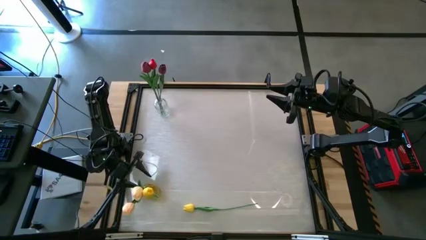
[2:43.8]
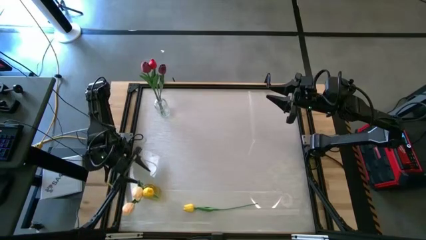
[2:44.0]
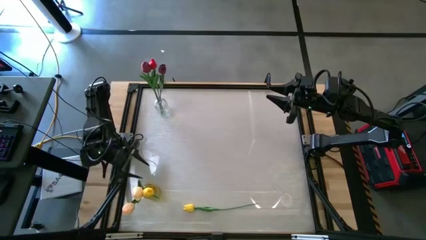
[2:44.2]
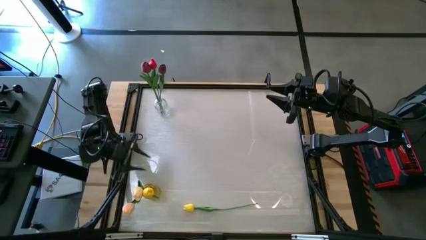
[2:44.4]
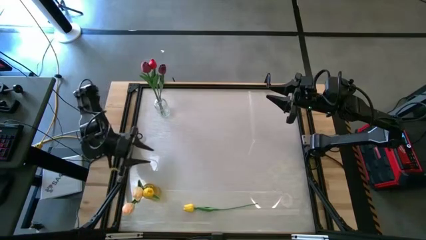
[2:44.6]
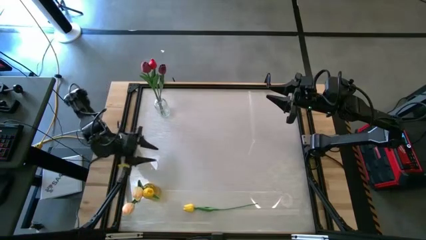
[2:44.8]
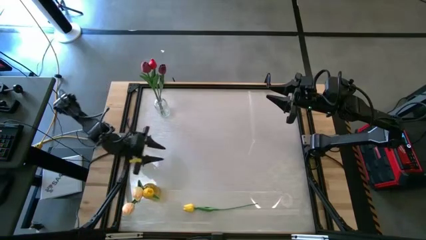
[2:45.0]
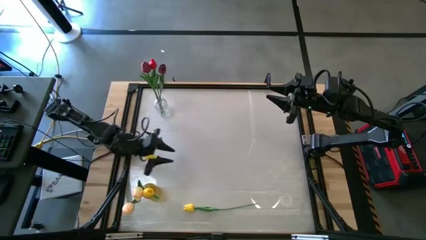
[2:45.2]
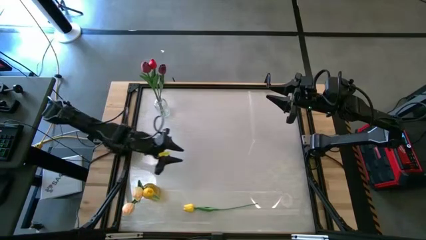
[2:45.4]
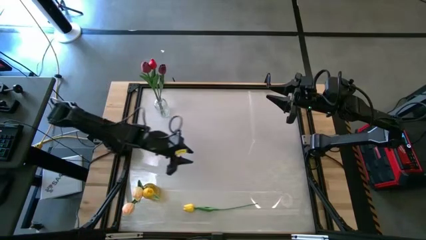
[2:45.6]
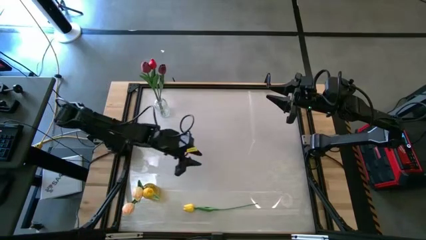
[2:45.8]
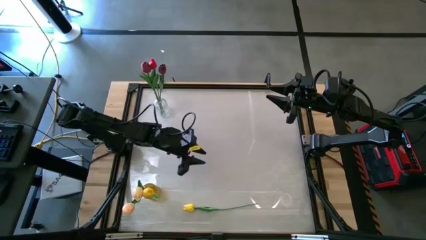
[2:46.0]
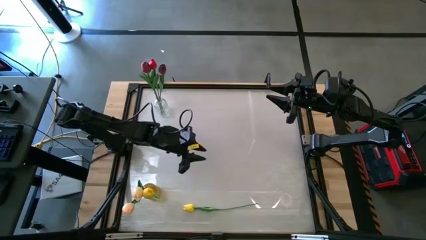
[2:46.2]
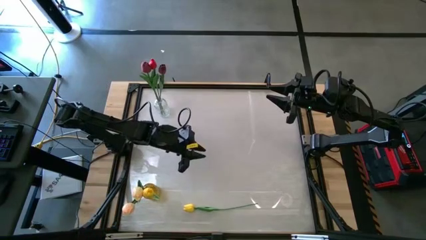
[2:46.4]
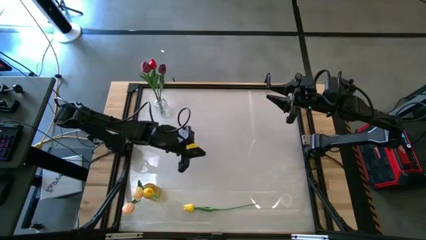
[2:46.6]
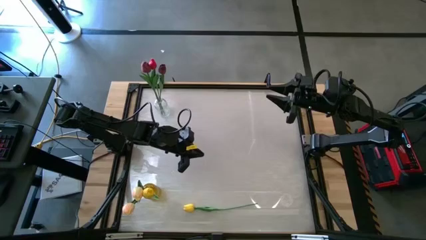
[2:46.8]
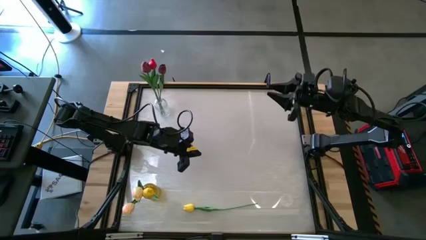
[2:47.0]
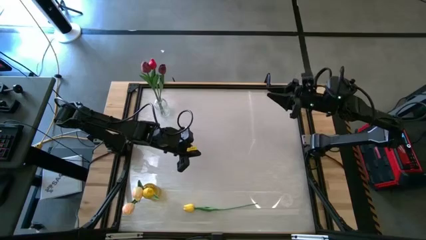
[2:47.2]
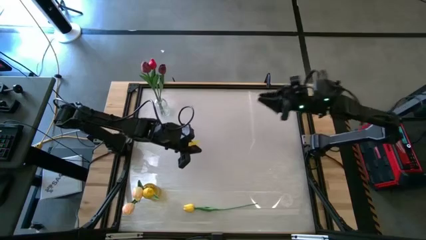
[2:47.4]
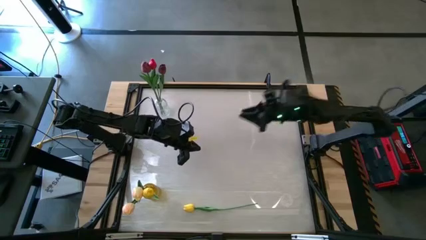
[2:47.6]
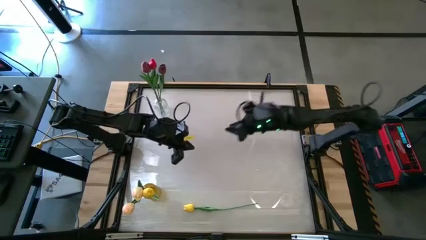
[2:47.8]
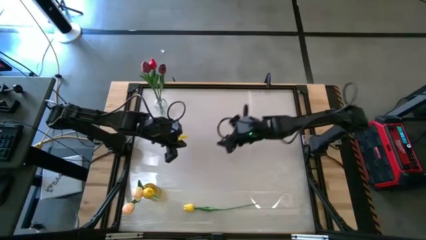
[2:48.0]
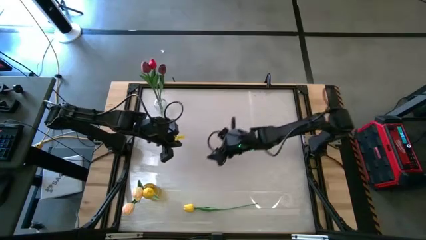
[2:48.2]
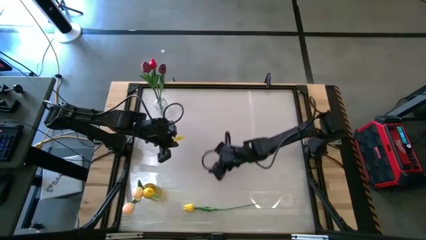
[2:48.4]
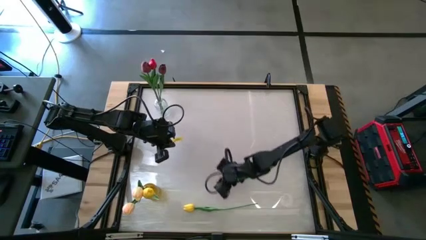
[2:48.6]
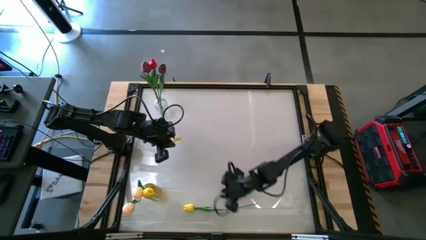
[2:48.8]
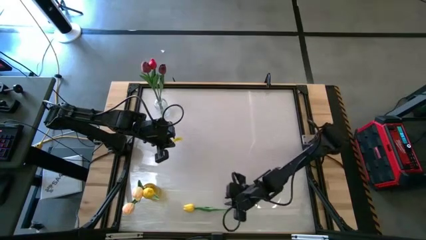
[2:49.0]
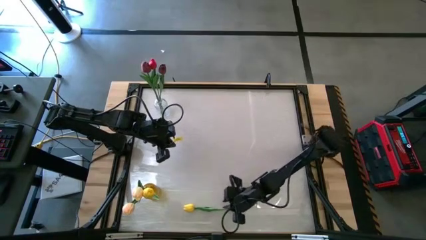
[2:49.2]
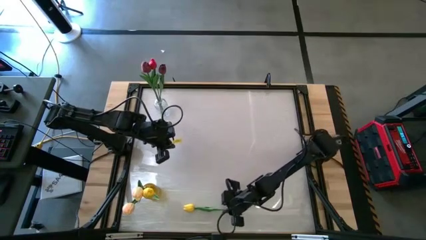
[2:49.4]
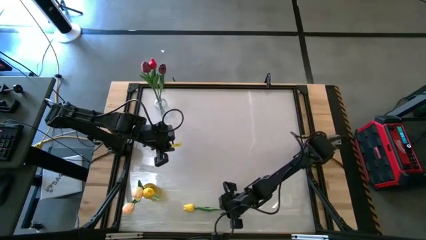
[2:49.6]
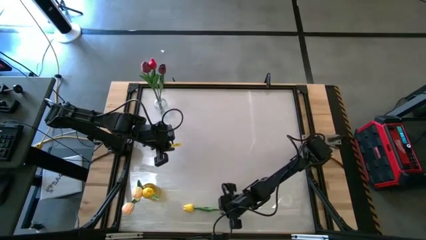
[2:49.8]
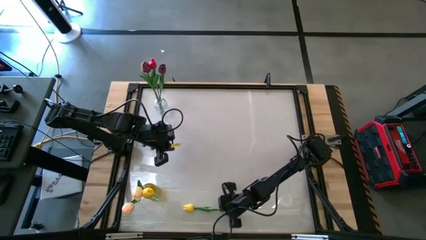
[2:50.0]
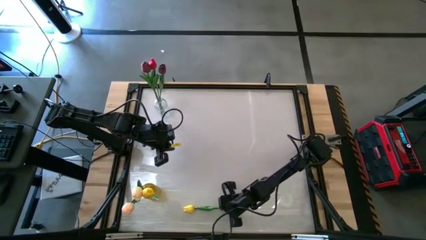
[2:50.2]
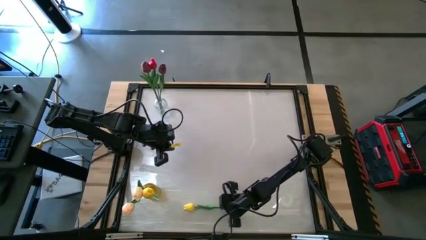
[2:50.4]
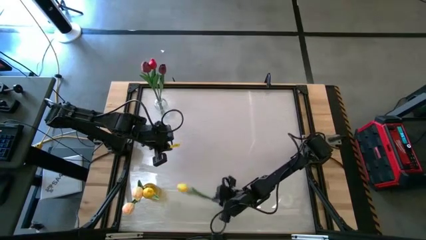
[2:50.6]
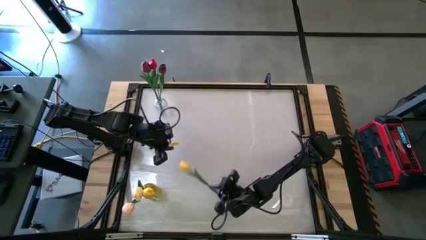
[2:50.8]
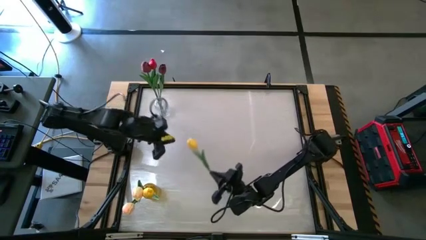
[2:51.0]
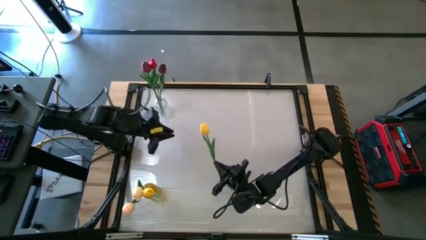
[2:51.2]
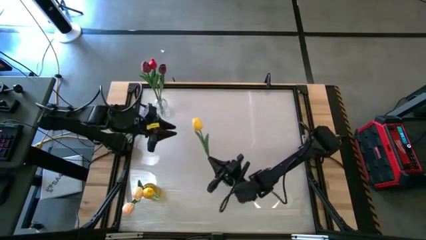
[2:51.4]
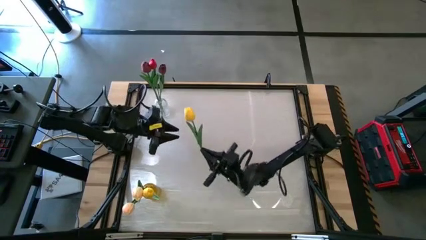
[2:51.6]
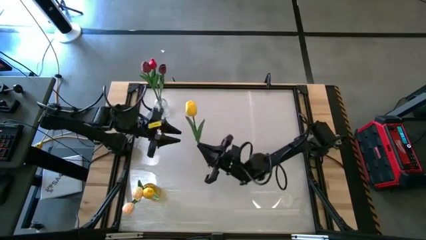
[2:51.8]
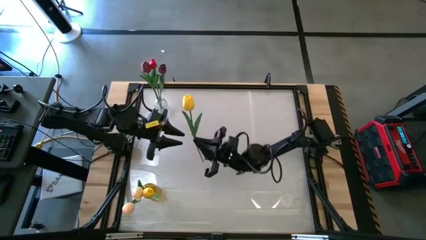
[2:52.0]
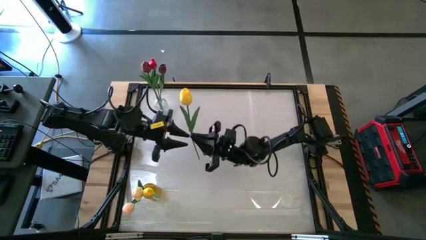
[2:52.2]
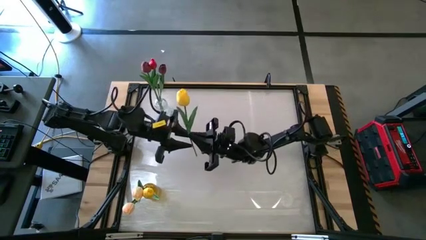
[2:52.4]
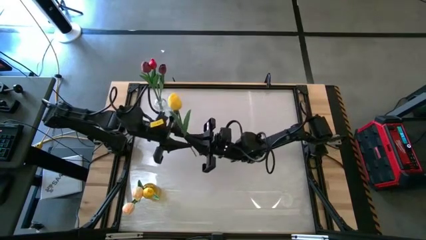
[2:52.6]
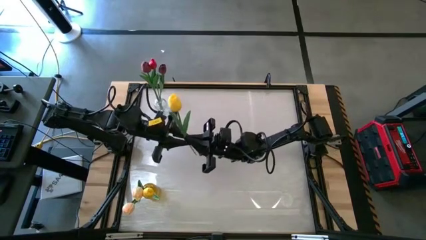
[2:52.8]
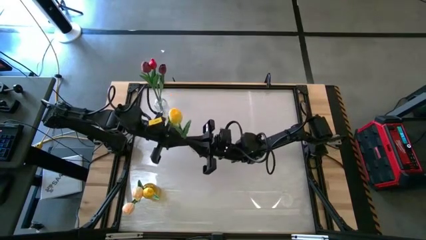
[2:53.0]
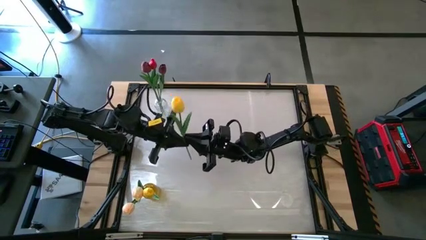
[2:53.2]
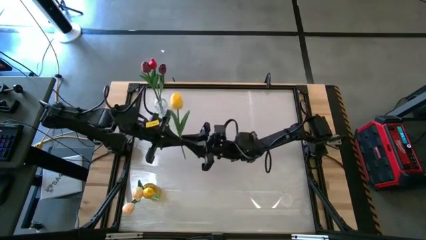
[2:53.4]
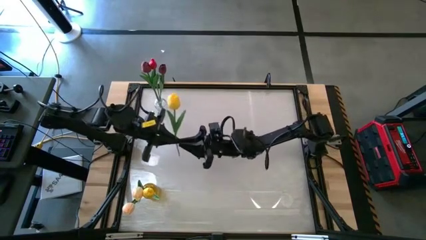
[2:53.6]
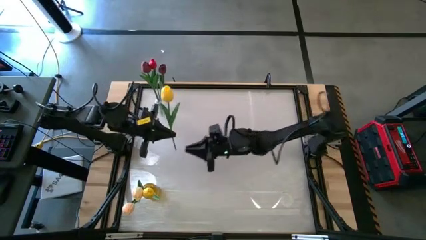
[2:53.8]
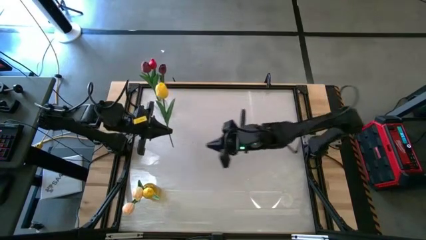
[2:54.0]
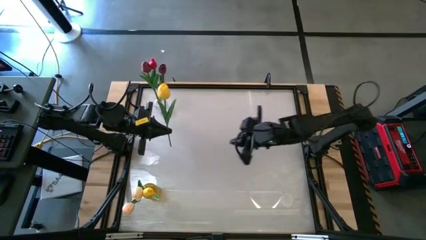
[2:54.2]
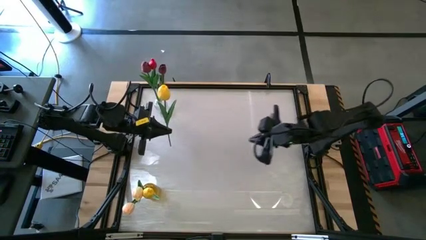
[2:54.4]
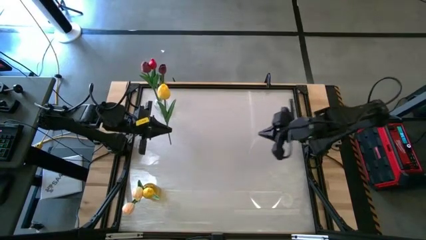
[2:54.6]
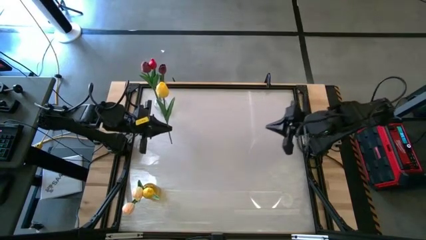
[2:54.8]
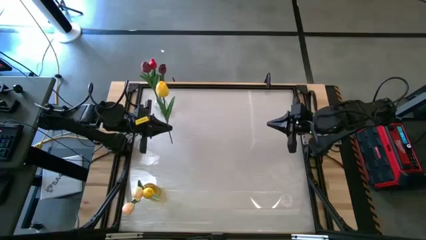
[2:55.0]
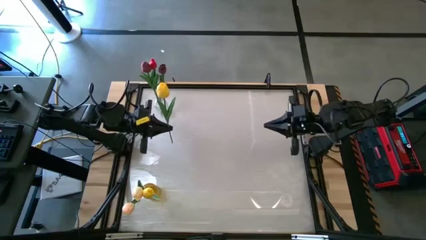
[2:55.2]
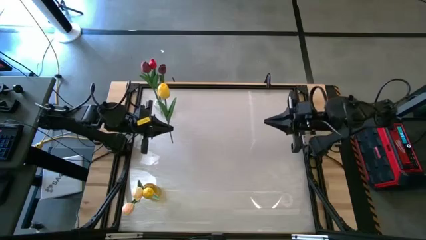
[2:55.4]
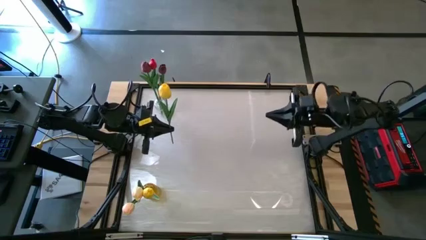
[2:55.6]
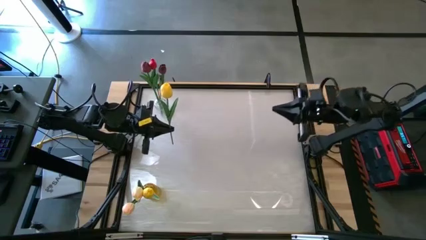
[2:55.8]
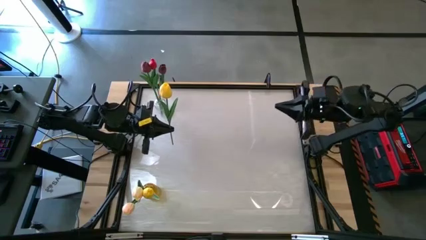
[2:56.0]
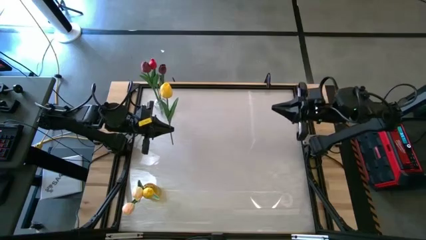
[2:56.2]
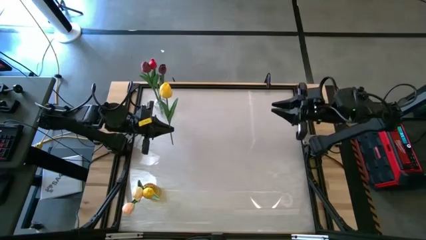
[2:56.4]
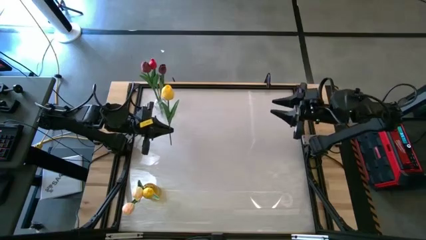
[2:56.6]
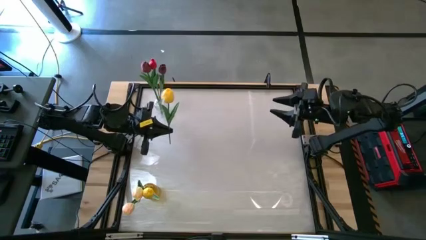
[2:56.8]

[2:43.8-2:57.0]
Task: Sort flowers into vase by color
Put the yellow flower into the yellow vase

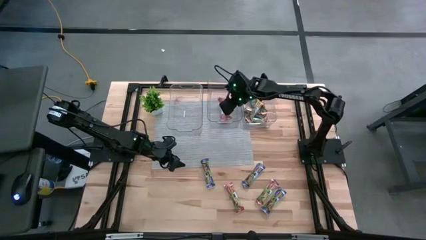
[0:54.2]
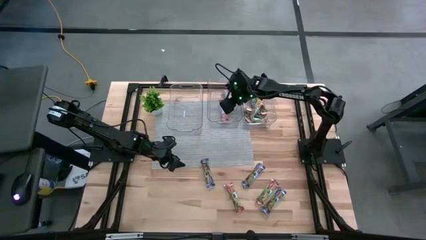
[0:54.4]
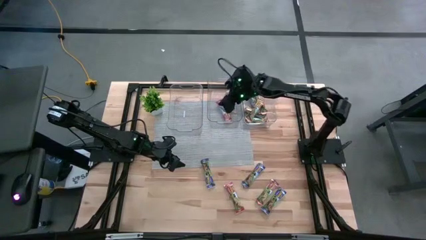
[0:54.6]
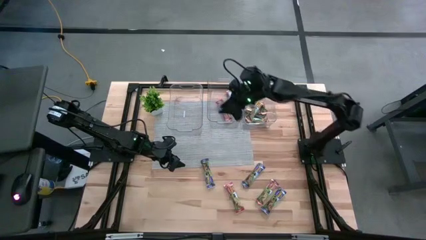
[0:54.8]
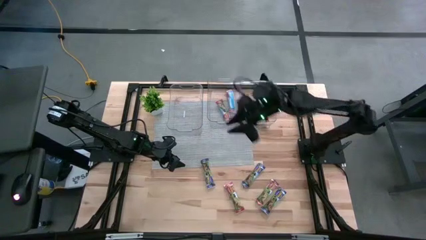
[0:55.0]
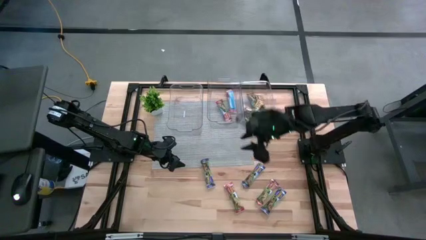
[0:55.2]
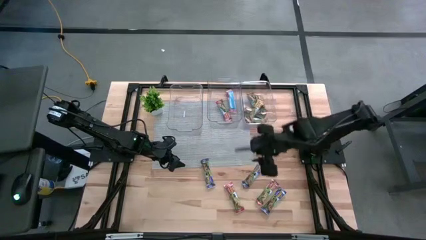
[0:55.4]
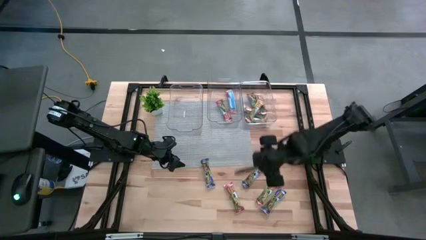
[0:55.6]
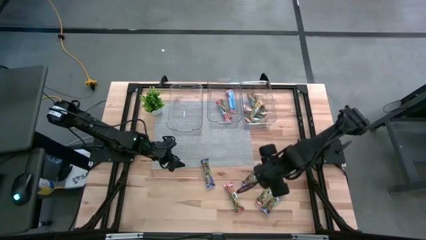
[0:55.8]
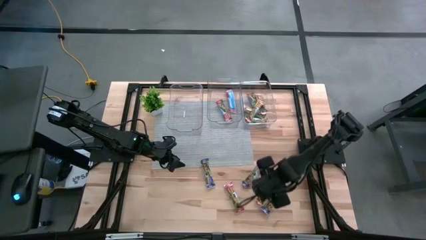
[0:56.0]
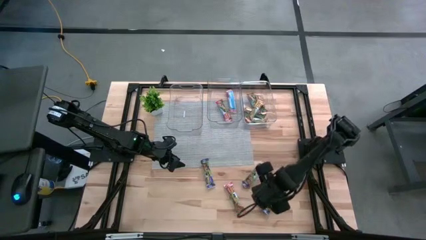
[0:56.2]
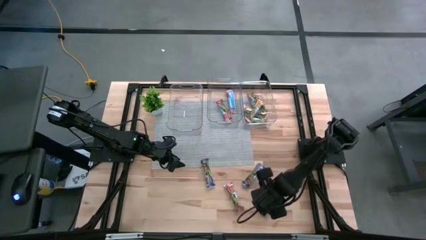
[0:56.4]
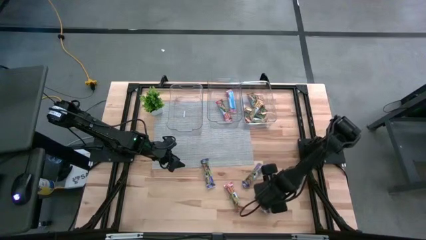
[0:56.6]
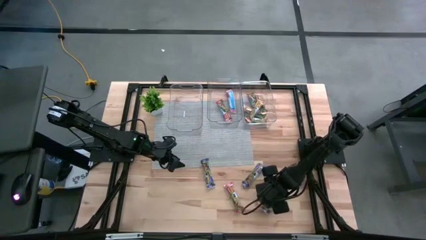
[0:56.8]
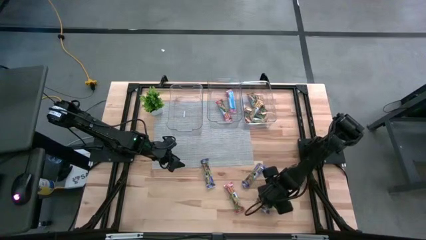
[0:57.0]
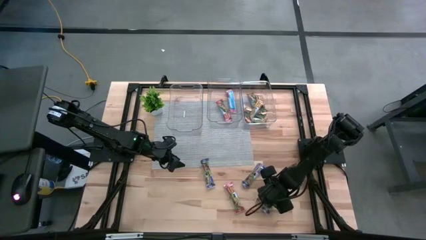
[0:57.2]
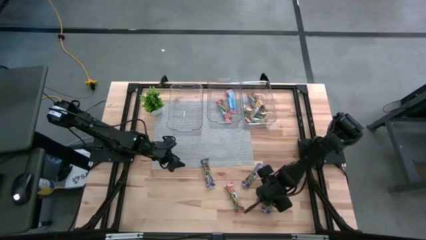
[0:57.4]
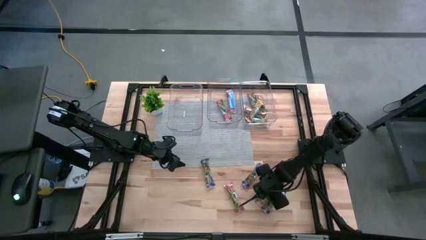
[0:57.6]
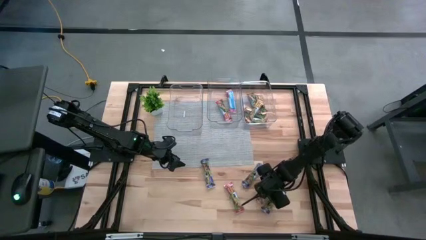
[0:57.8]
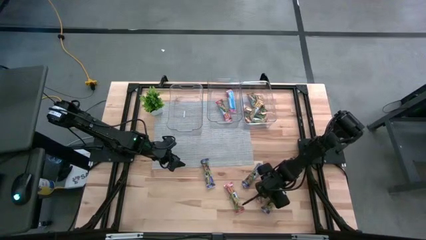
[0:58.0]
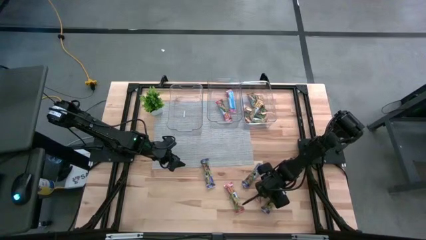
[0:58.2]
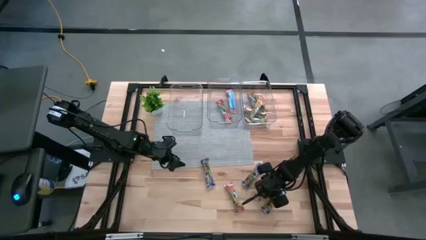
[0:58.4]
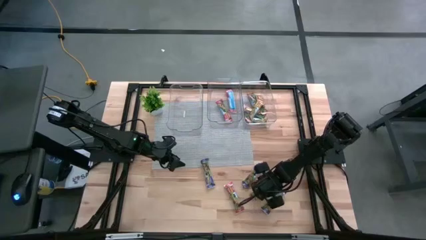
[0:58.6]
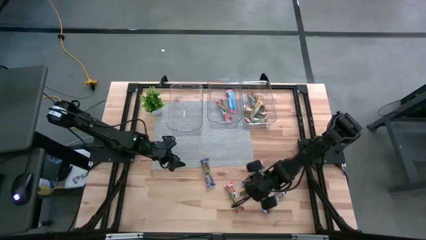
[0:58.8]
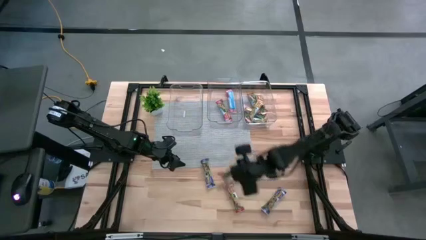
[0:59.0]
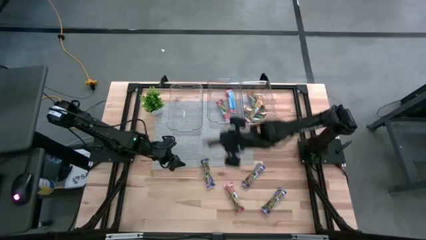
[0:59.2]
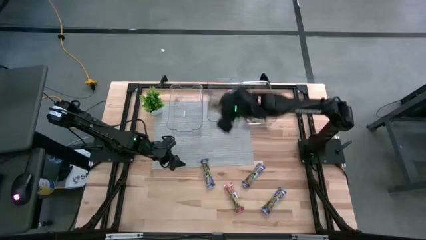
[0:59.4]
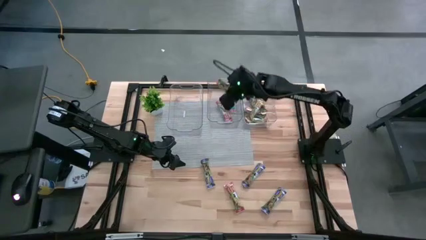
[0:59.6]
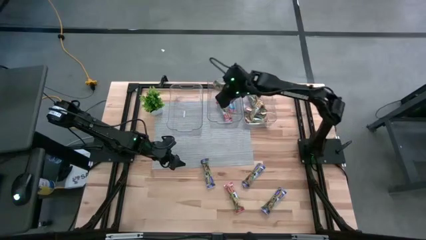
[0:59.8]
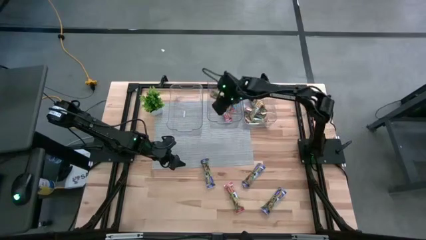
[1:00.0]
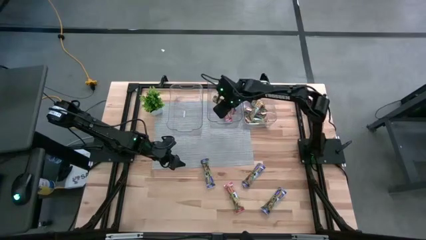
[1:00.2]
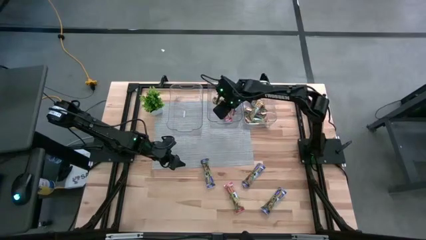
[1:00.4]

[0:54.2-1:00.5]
Task: Pick and place Granola Bars by type
Put the red granola bar into the middle transparent bin
